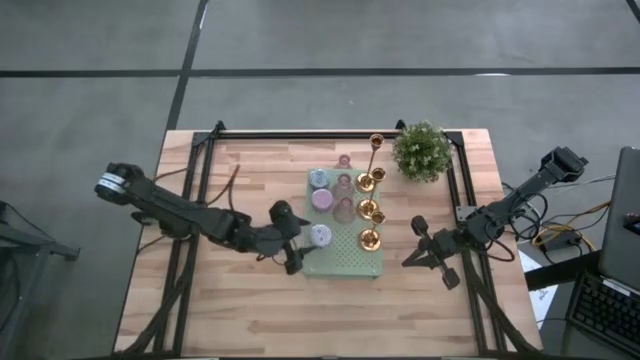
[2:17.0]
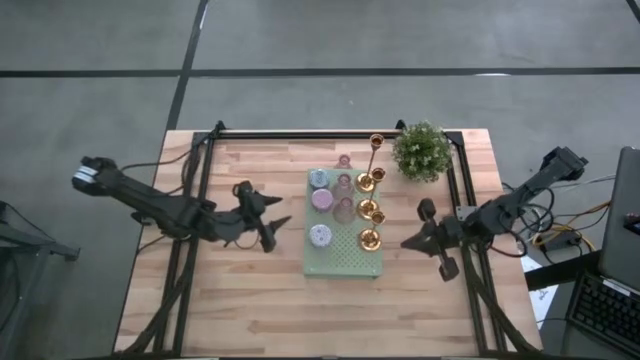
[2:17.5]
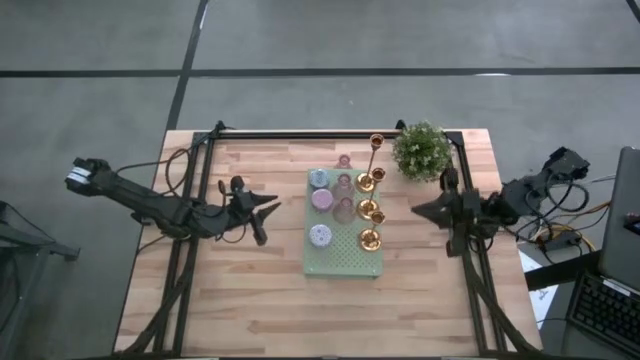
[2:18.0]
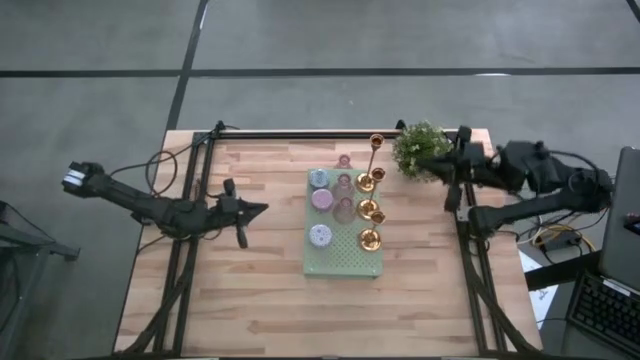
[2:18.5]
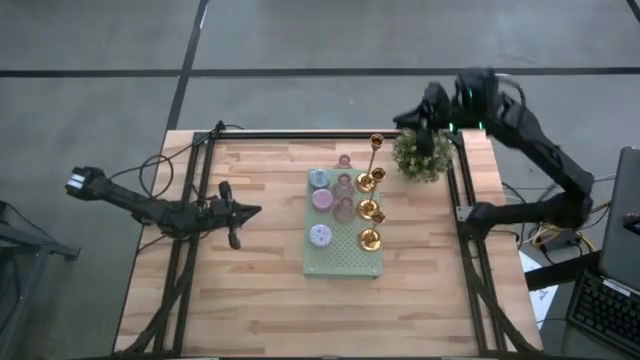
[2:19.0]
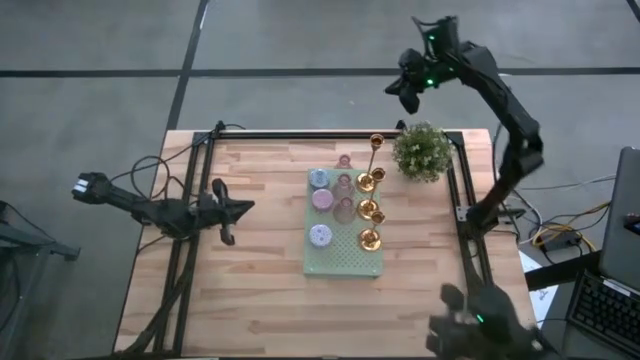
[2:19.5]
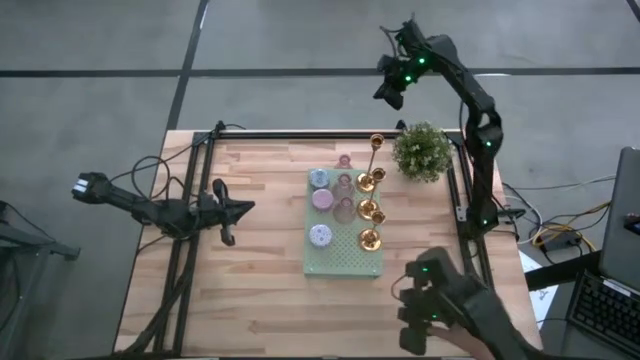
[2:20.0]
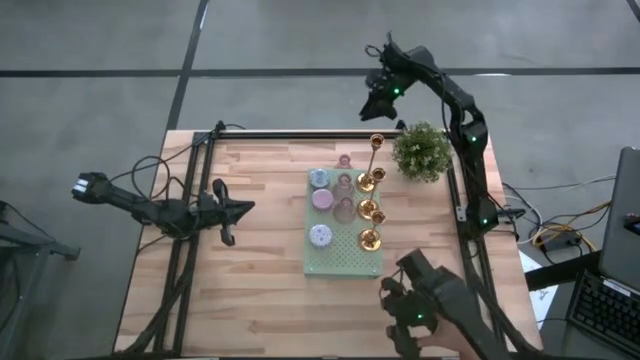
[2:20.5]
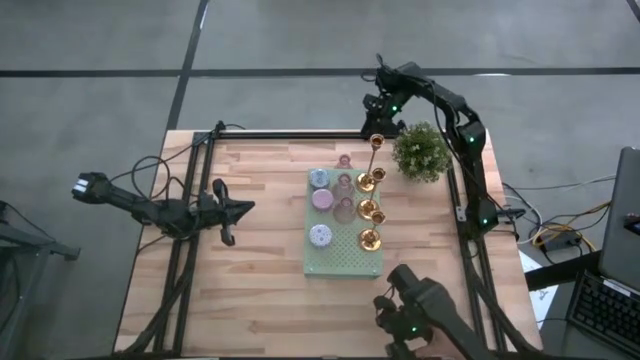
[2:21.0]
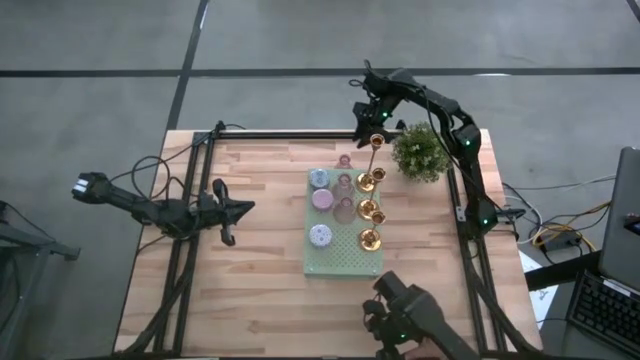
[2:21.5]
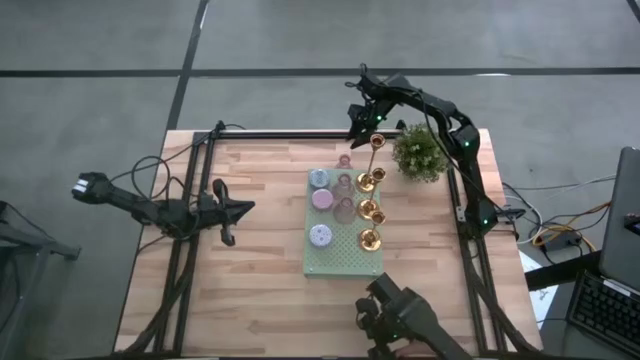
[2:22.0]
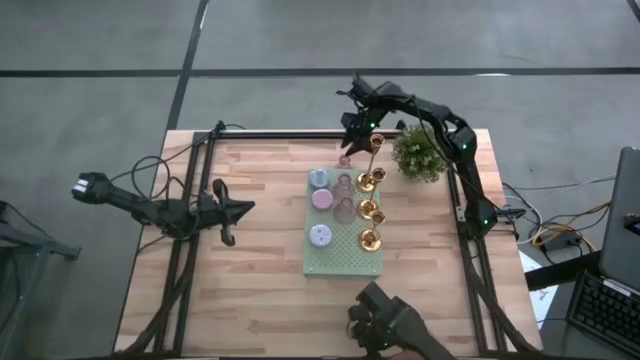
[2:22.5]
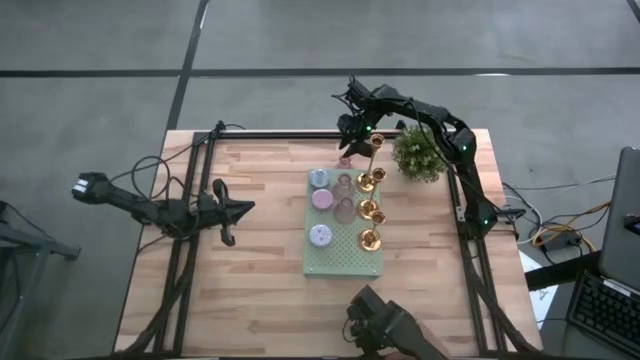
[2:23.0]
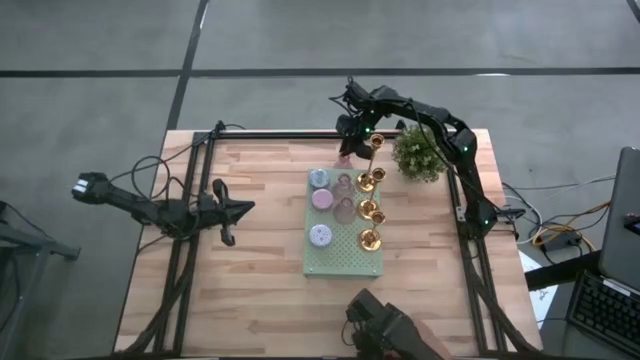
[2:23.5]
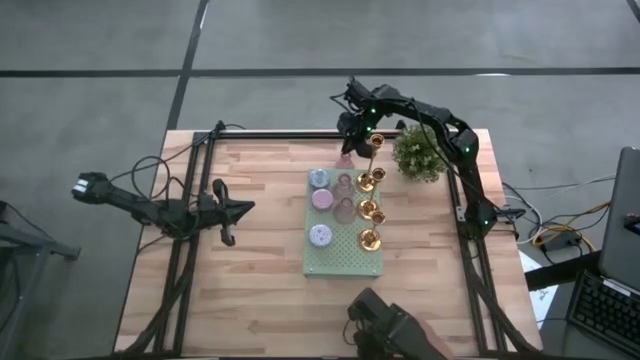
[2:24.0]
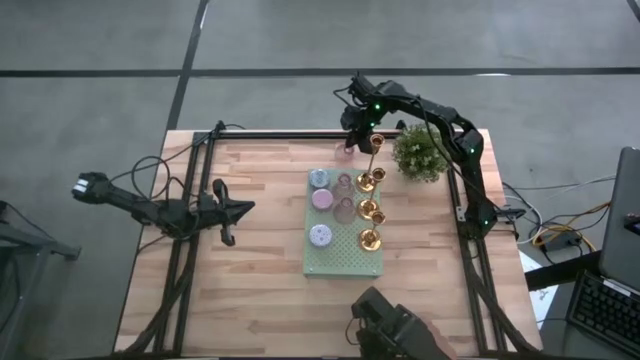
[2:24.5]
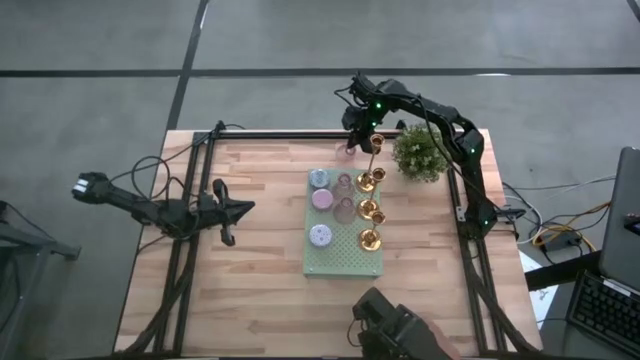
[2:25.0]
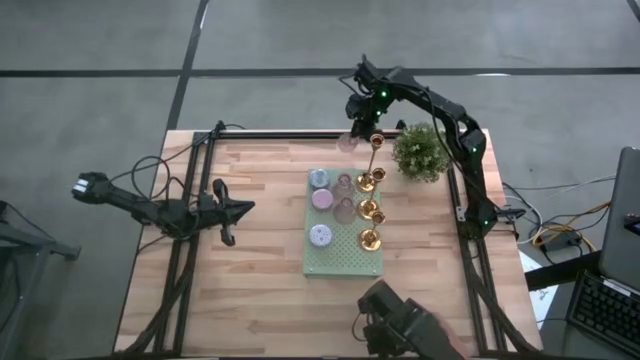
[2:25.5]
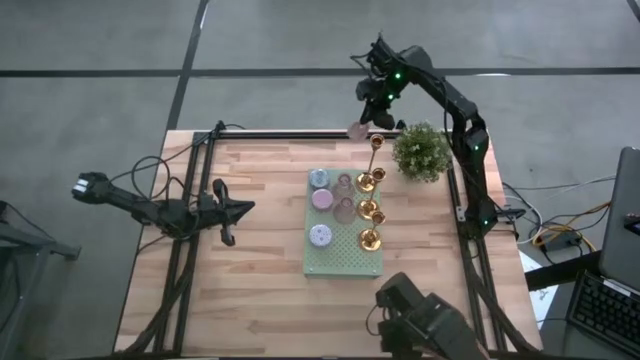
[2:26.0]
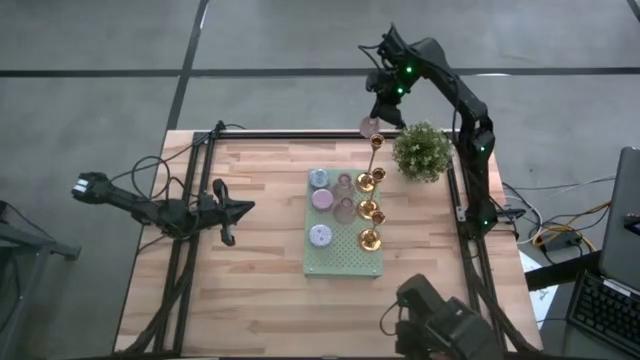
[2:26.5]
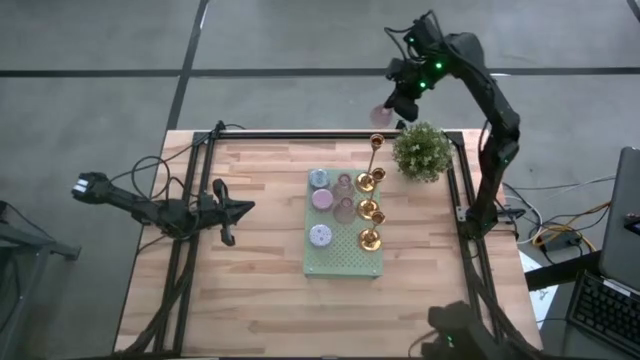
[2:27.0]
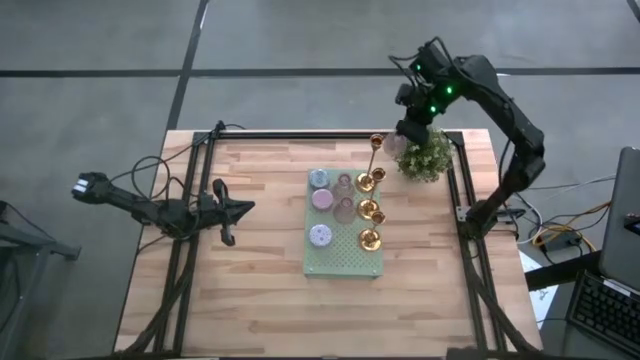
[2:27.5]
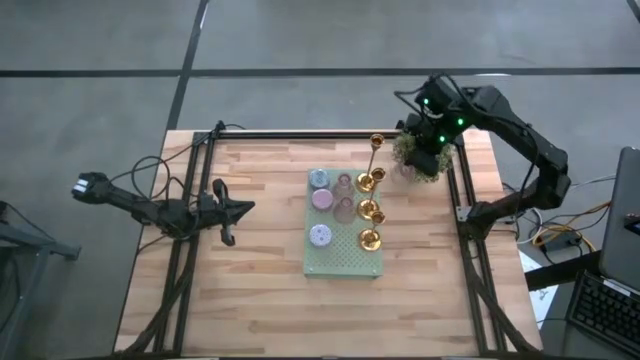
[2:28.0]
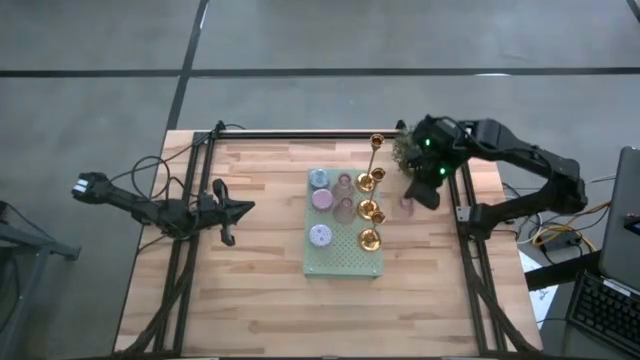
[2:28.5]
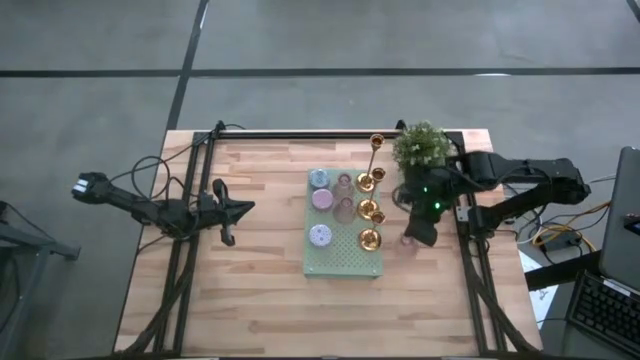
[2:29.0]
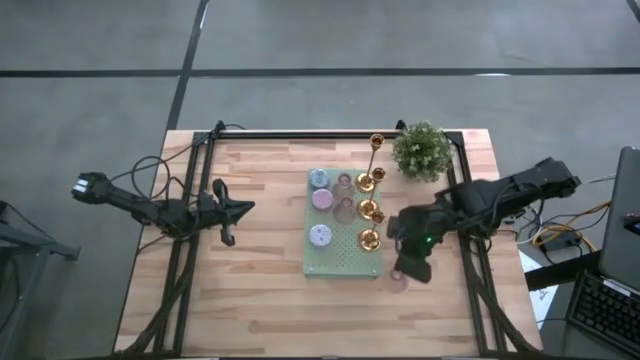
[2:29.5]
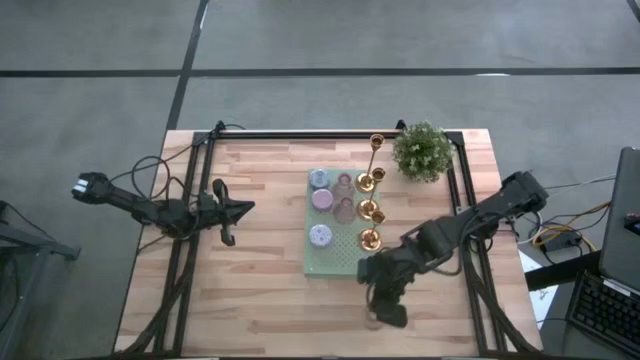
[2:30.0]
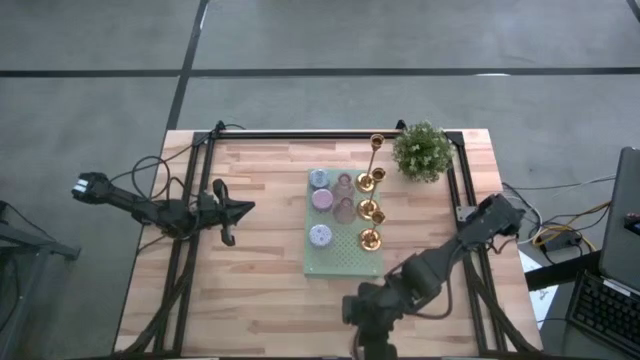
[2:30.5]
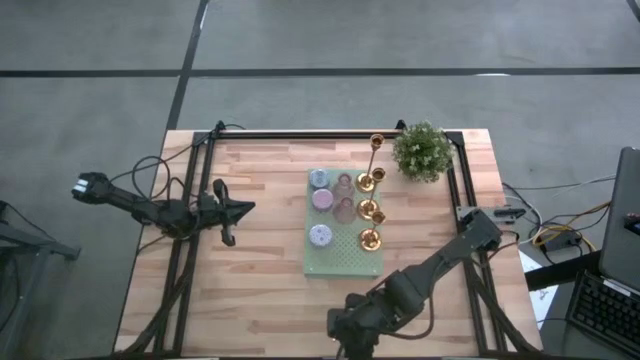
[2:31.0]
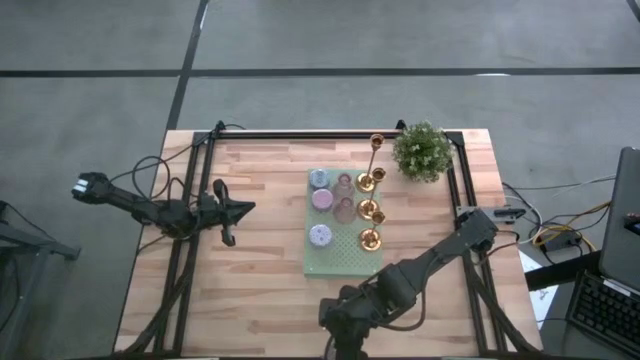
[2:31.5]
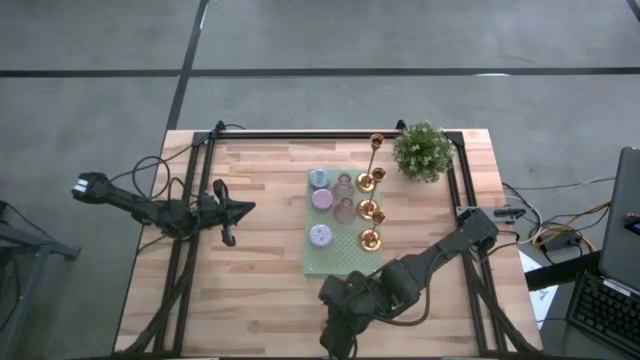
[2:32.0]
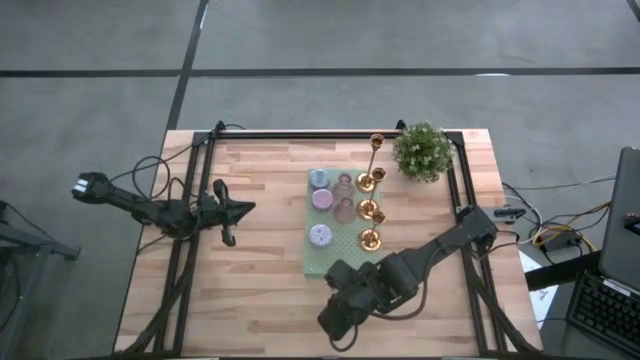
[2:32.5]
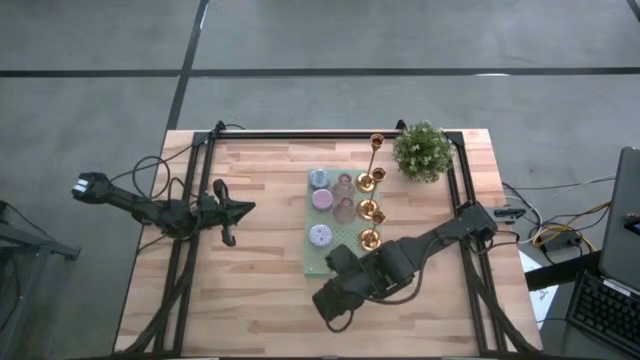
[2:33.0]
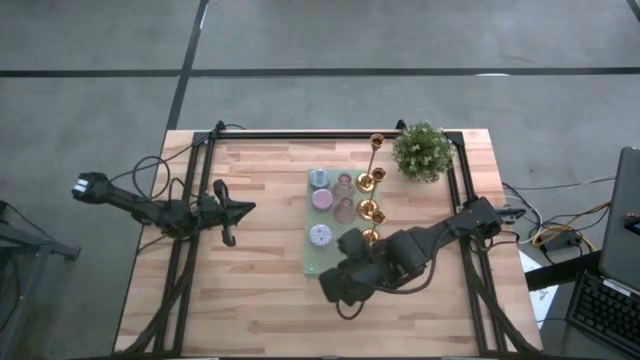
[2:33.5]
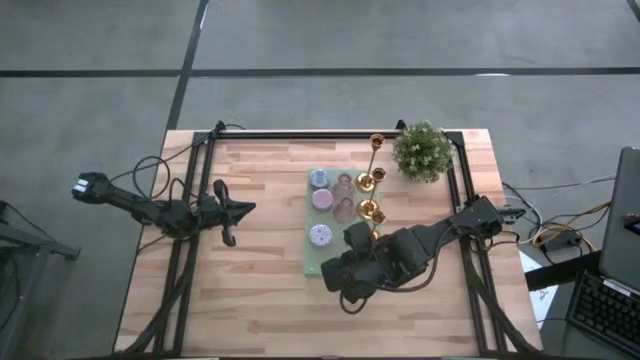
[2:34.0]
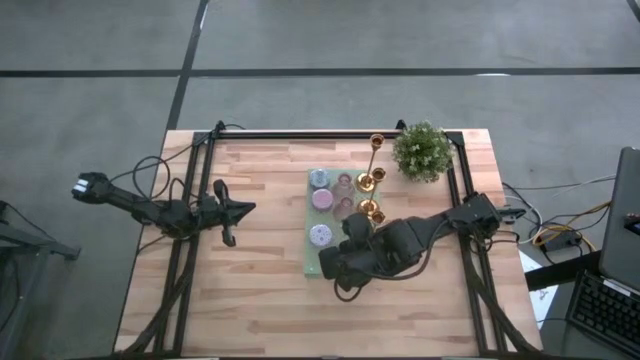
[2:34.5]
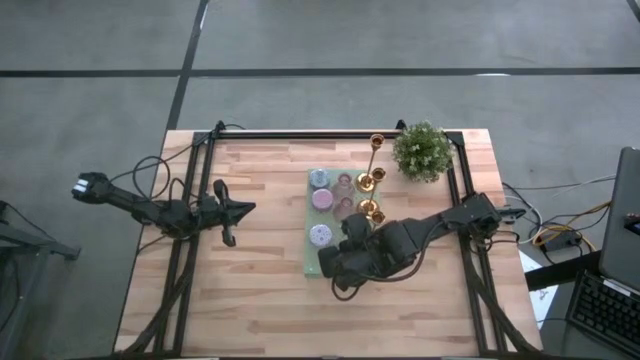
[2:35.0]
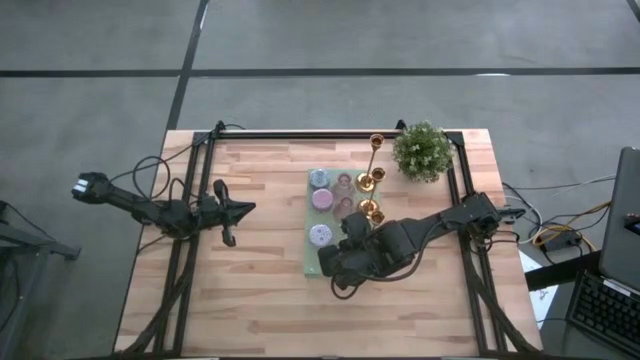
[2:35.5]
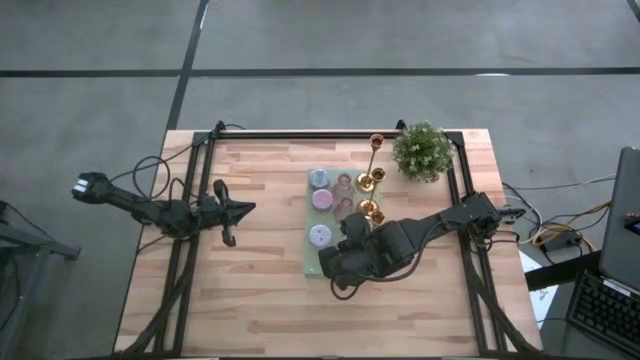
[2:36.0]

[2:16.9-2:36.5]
Task: Pick & Place candle stick holders
Put the purple vase on the shelf aligned with the other purple vase

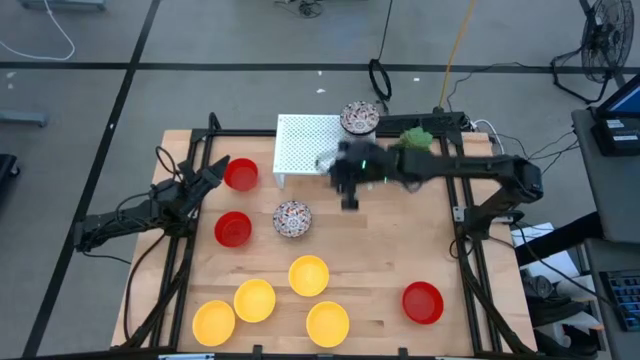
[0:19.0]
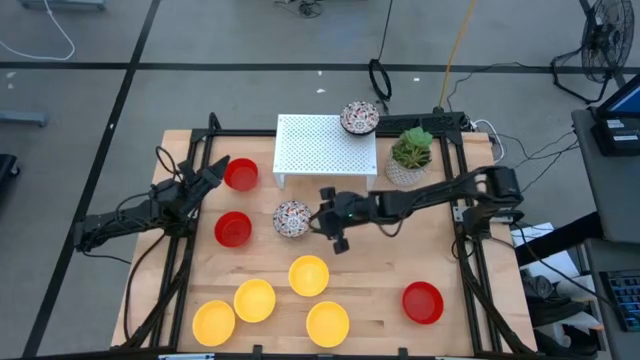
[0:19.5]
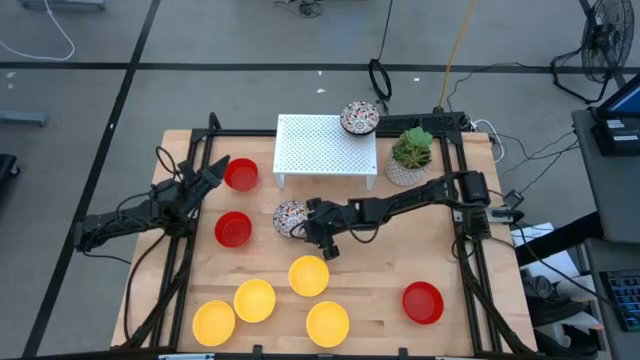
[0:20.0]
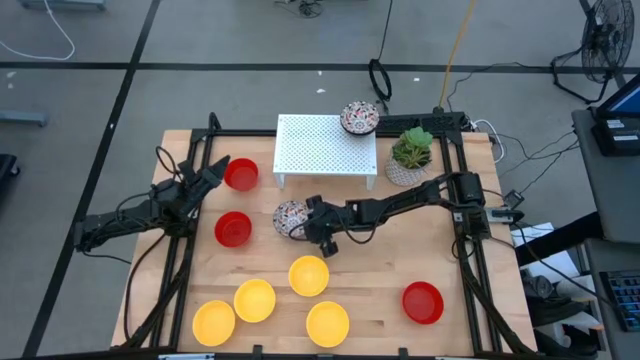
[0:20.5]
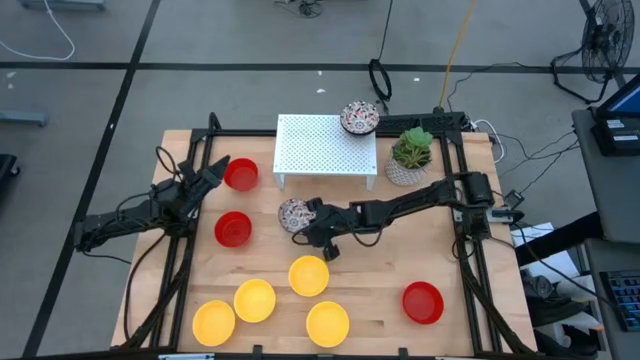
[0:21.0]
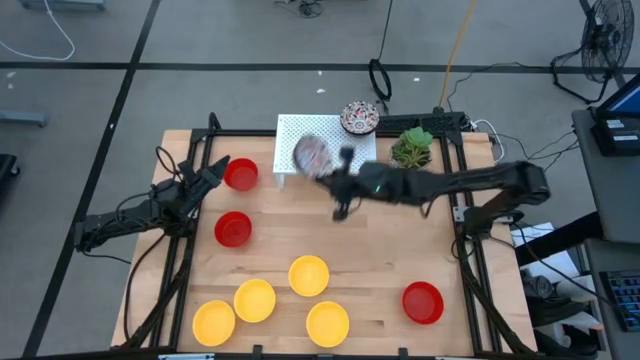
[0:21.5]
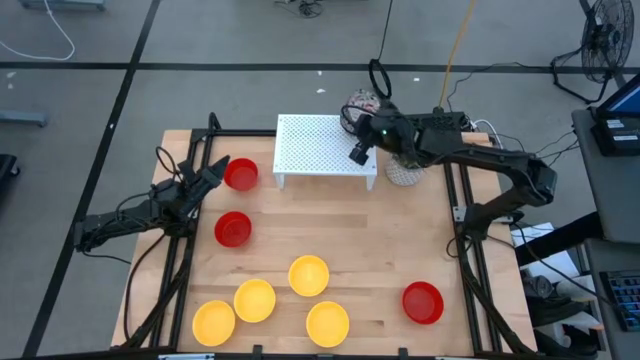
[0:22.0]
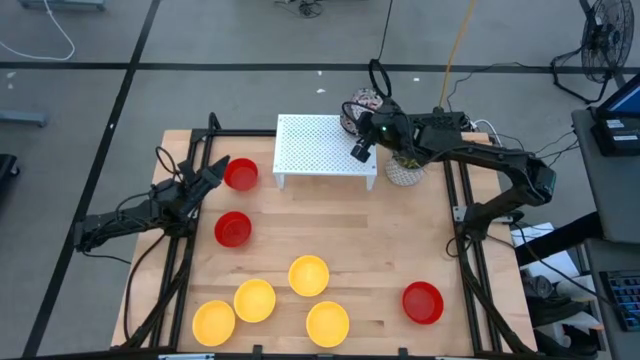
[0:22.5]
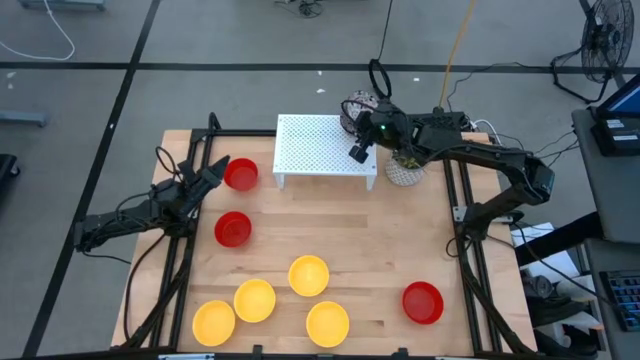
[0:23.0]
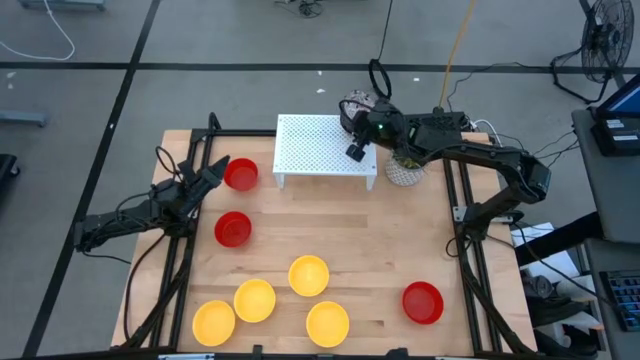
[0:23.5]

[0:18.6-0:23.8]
Task: Pick & Place Mini bowls
Stack the white patterned bowl on the white patterned bowl on the shelf
